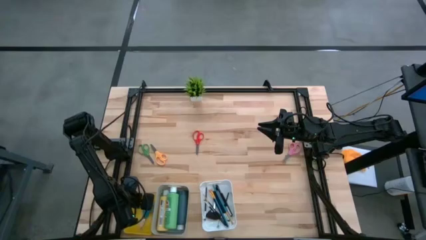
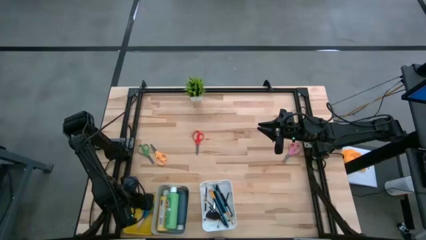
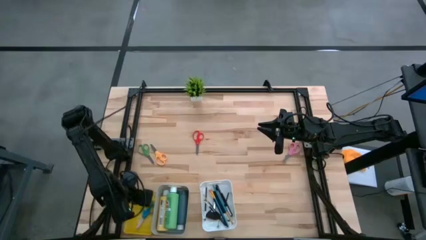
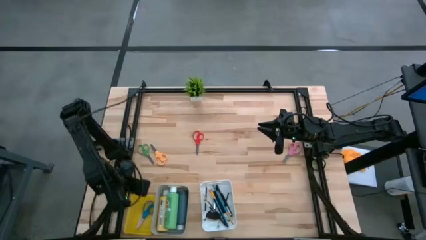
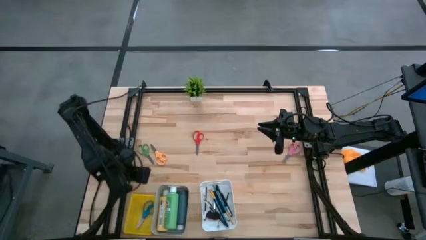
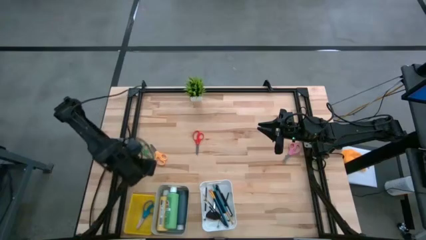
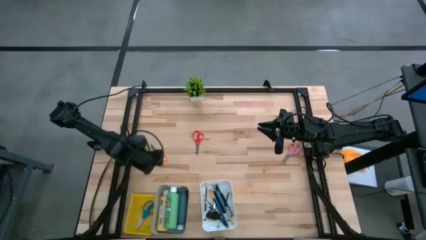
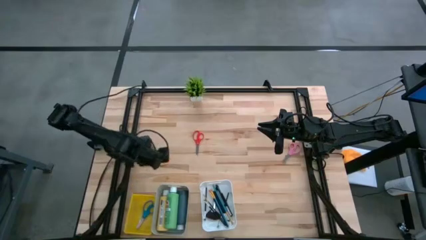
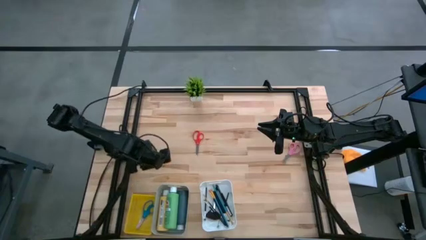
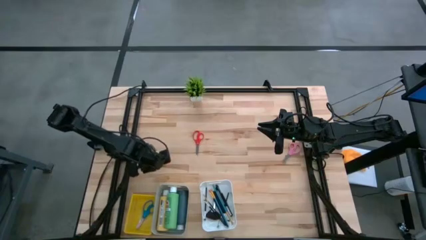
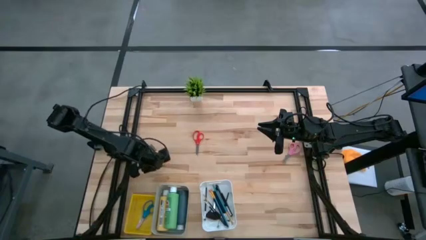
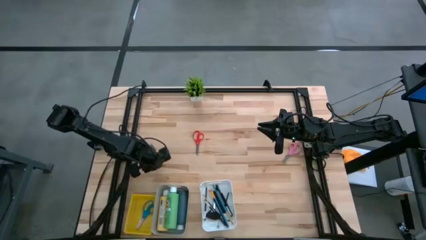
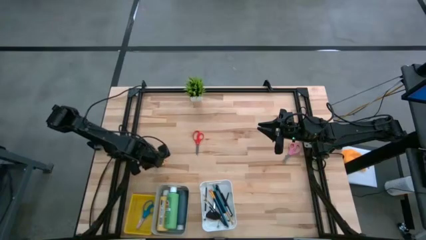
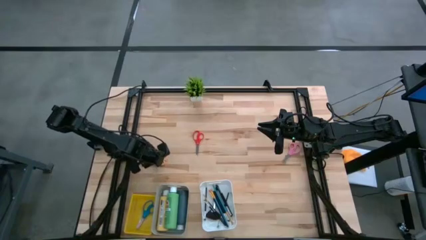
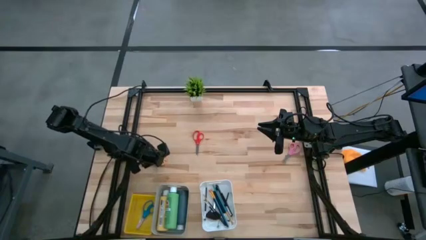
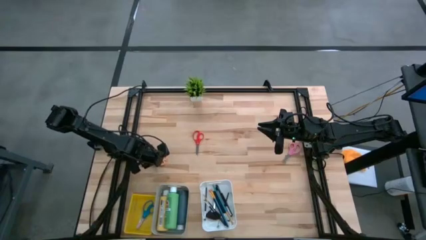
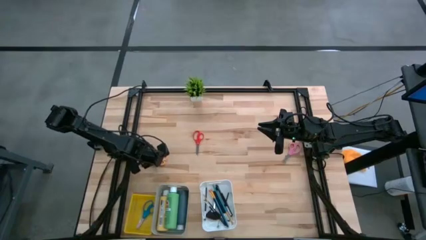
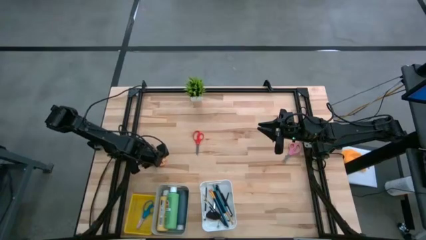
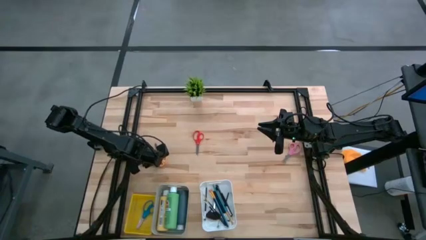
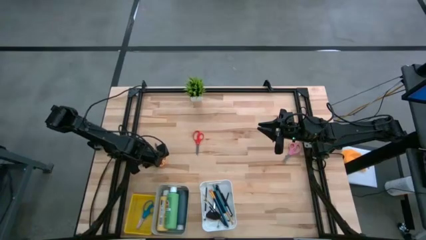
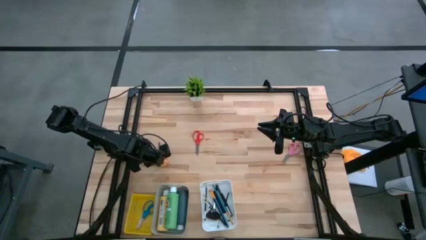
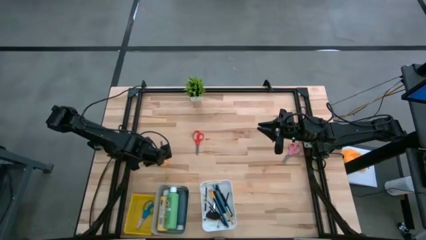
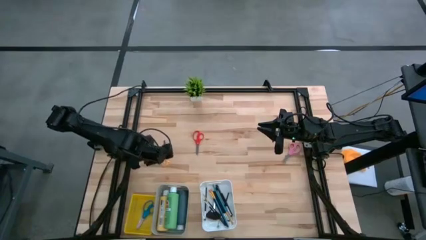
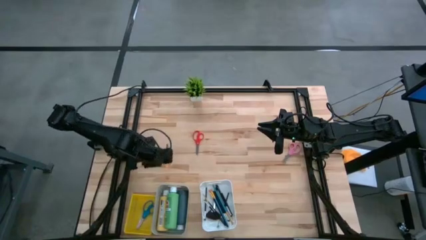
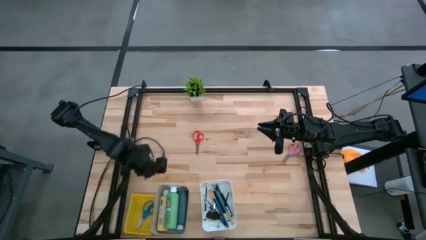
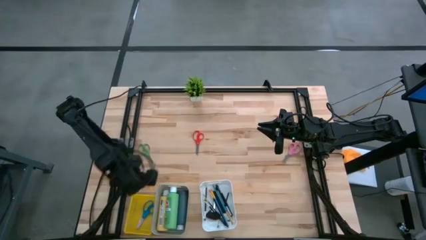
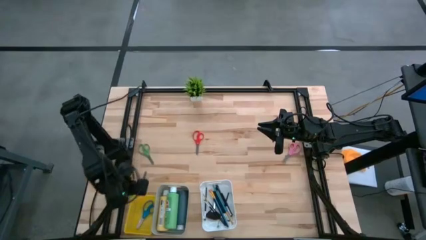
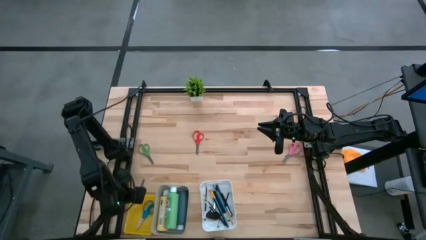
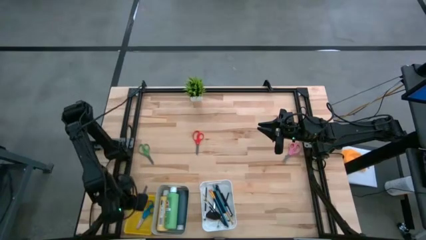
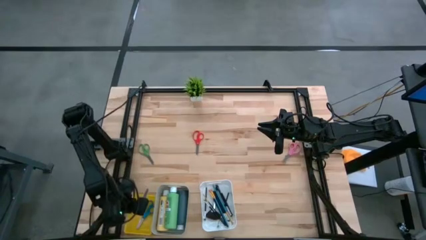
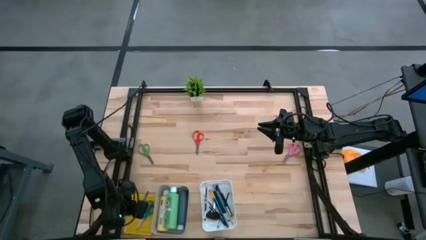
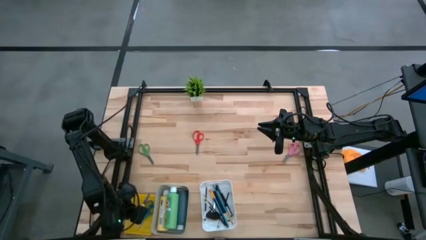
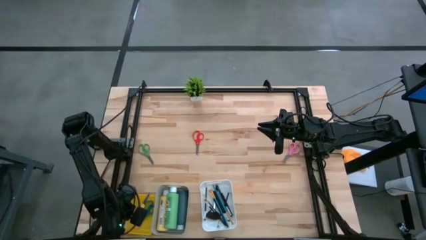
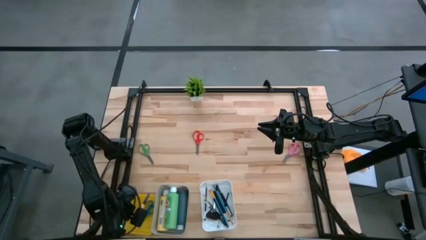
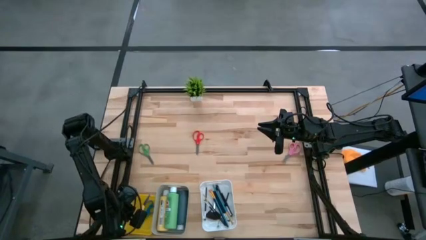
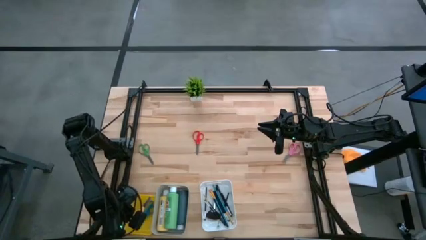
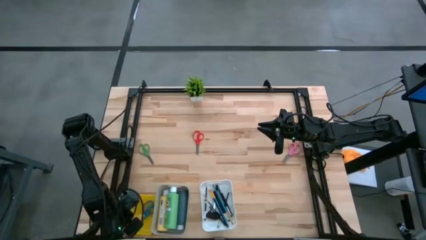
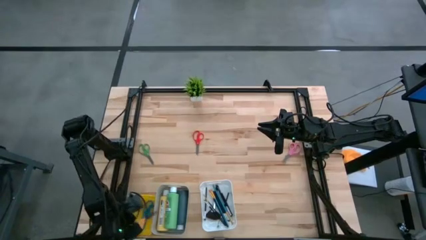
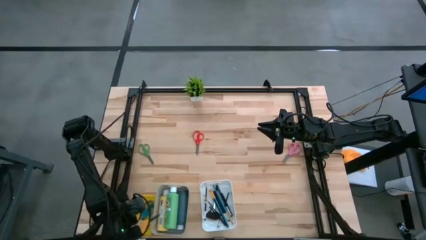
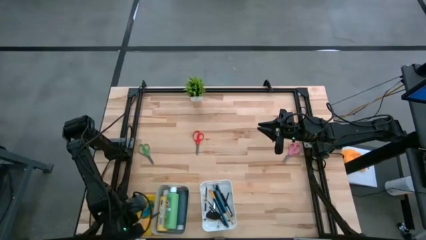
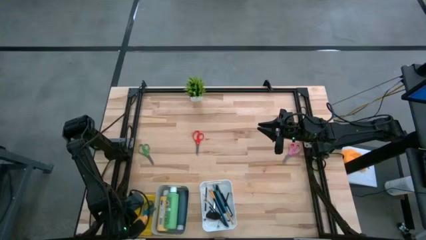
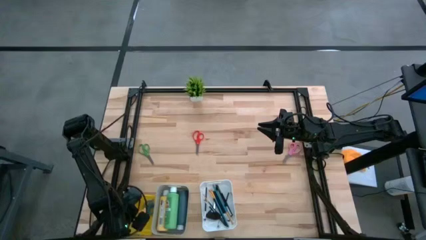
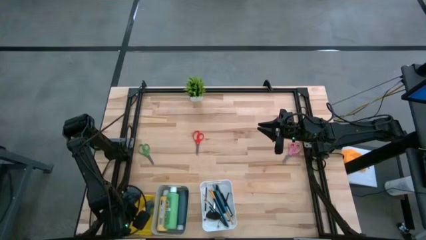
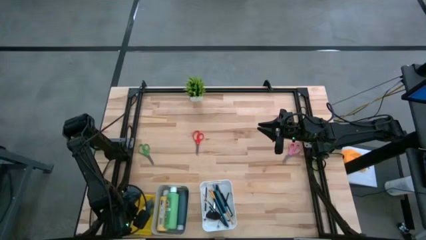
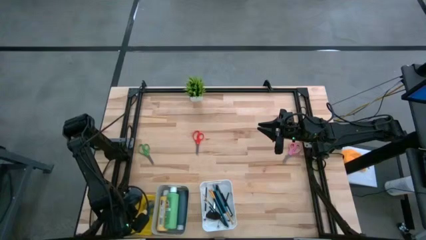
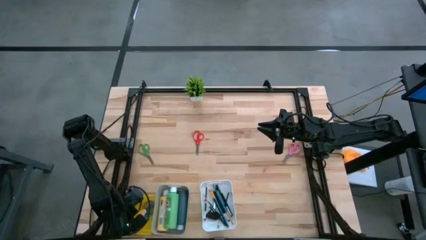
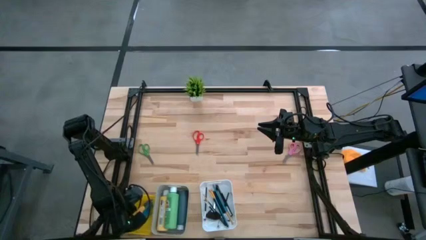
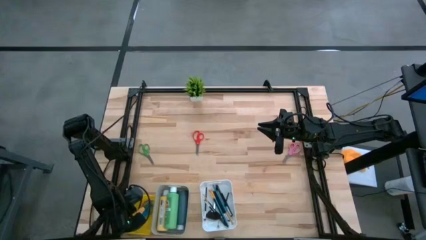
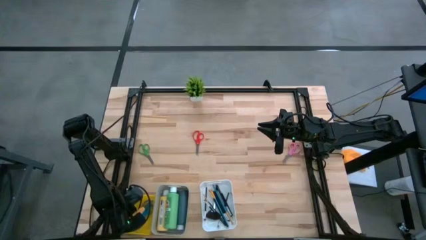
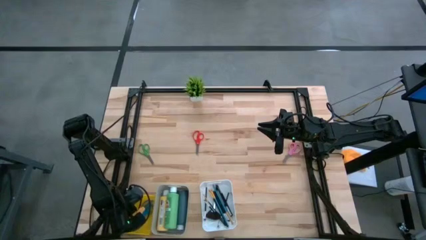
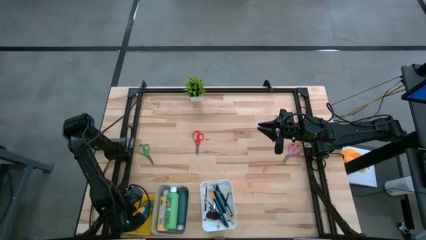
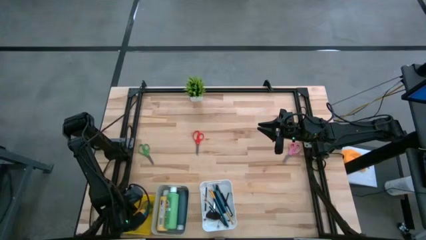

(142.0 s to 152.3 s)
Task: Pick & Place Paint Supplies
Put the yellow scissors into the yellow bin

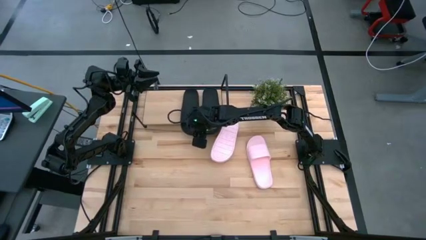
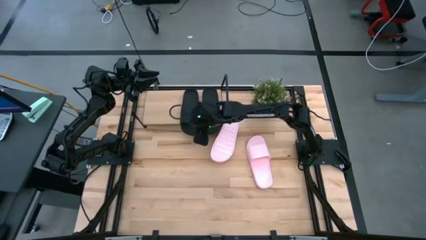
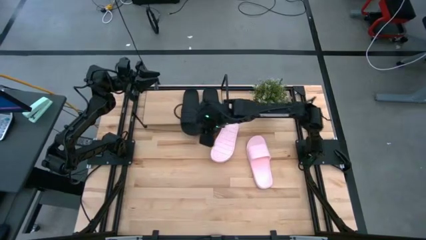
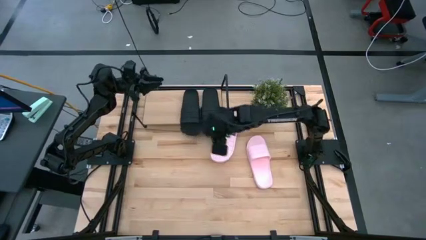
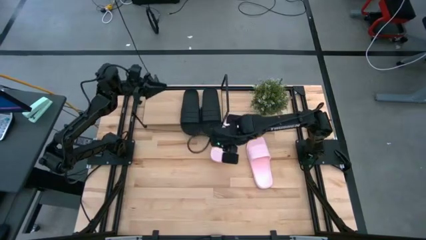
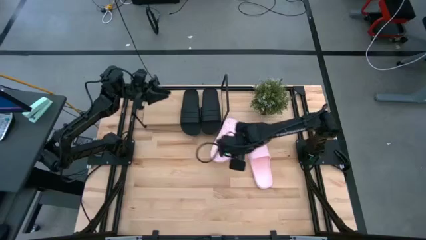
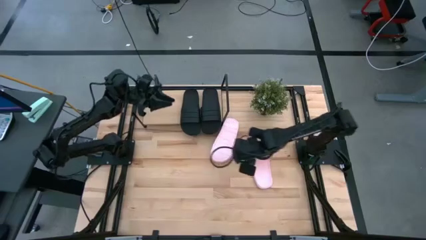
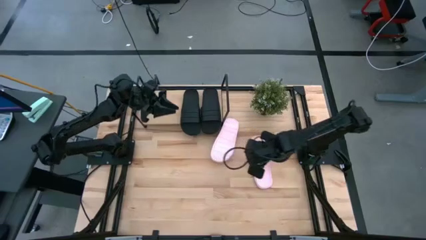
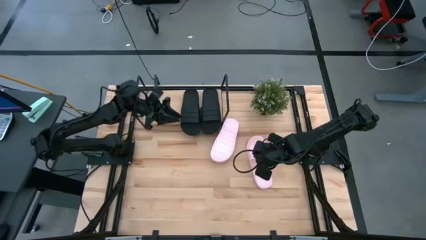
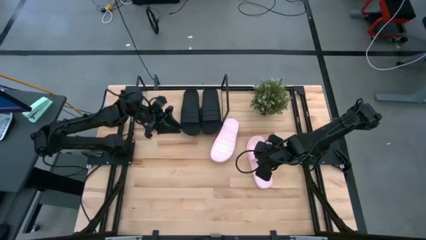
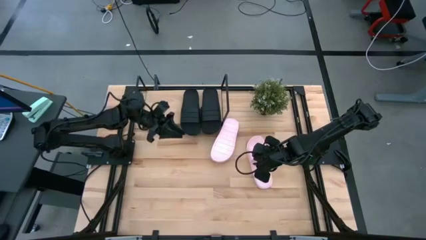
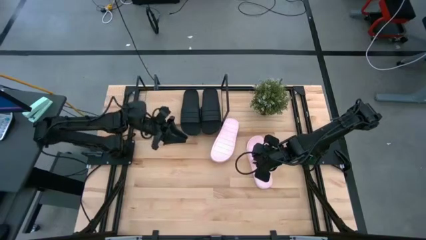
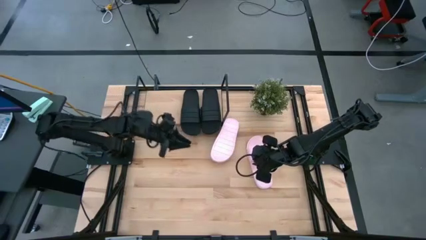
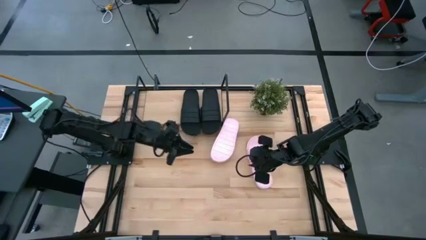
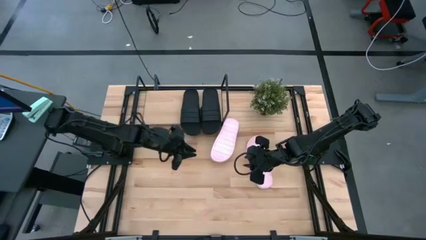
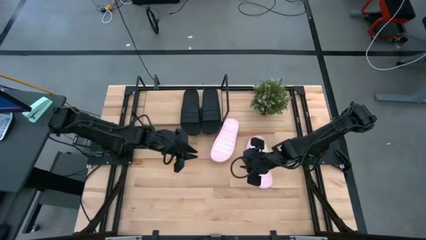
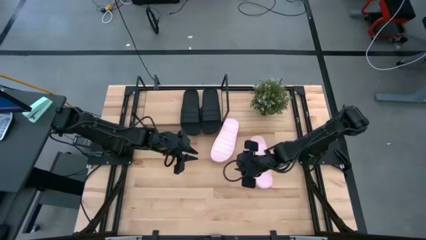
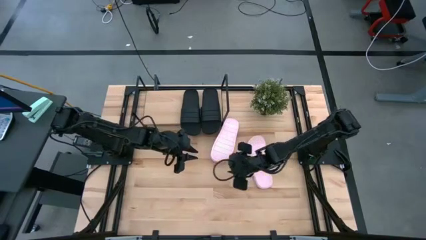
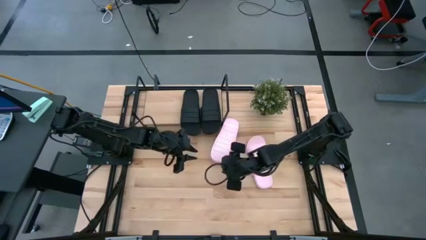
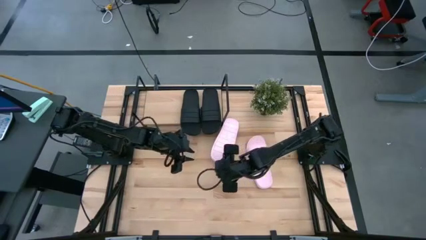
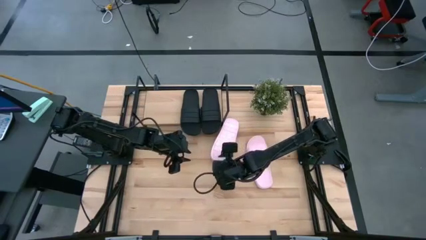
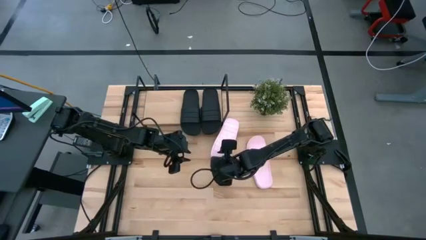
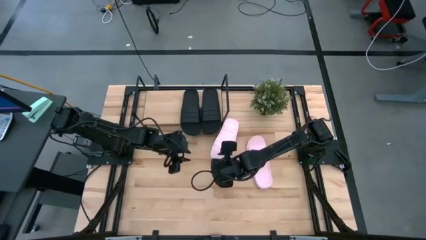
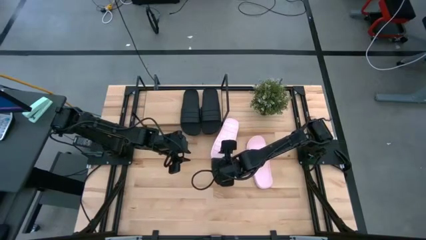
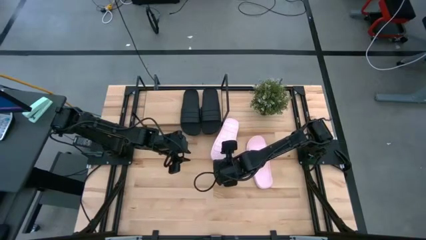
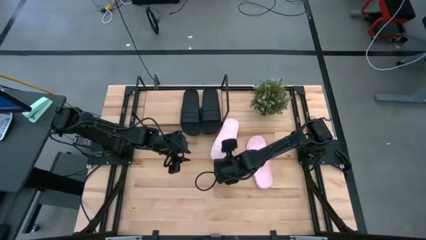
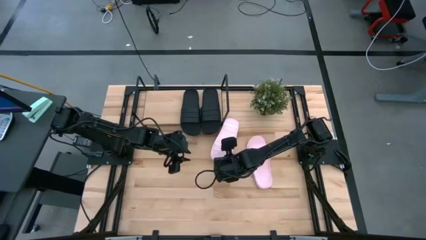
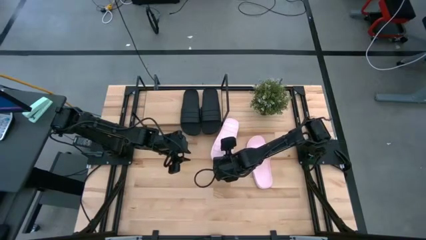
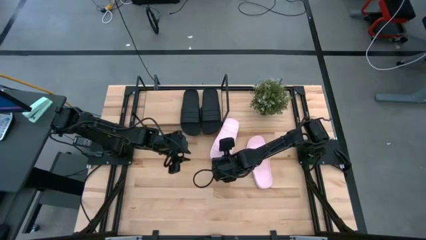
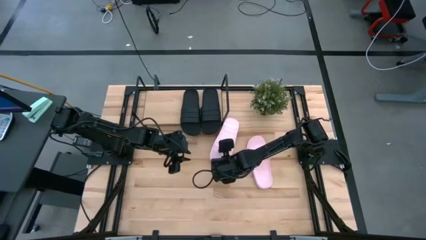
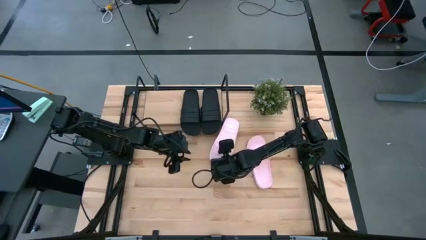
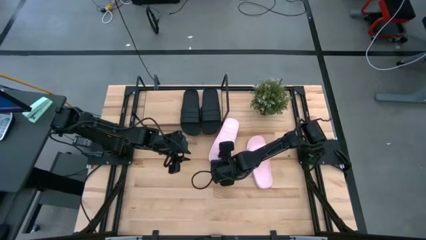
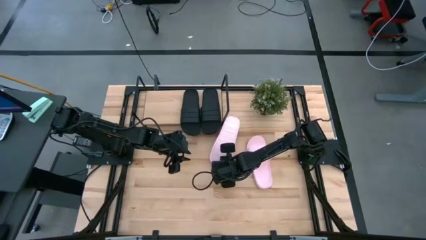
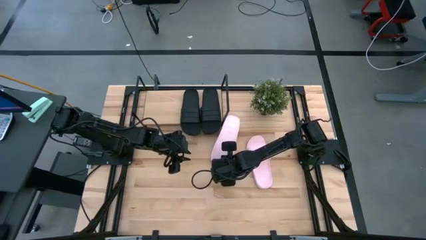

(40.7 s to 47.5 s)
Task: Pick and place slides into the shelf
Put the top pink slipper onto the shelf
